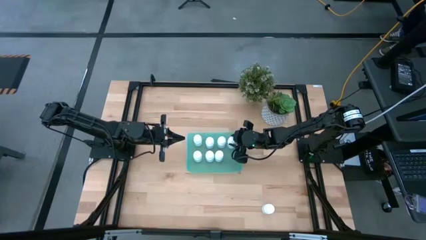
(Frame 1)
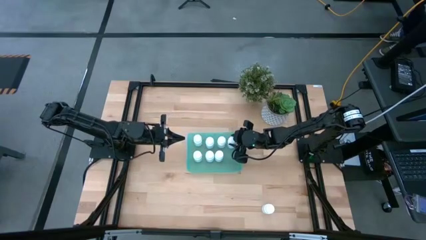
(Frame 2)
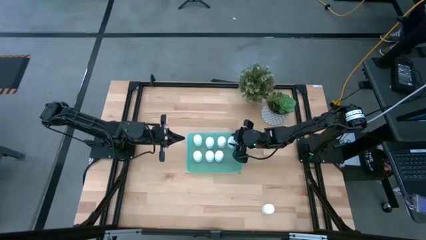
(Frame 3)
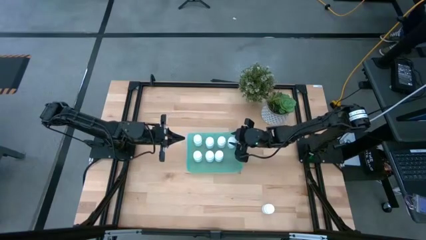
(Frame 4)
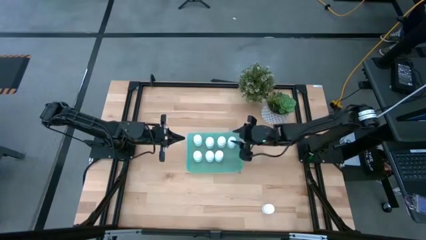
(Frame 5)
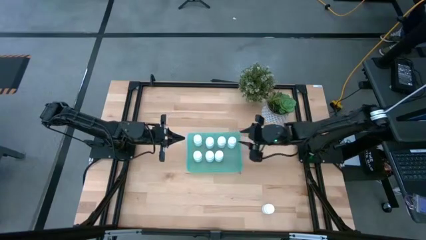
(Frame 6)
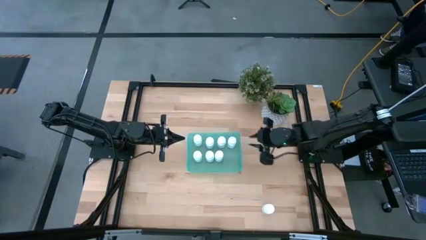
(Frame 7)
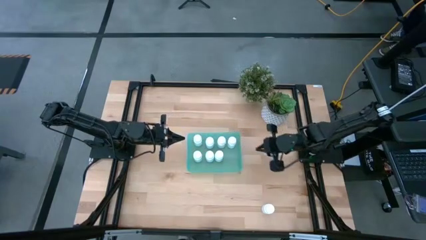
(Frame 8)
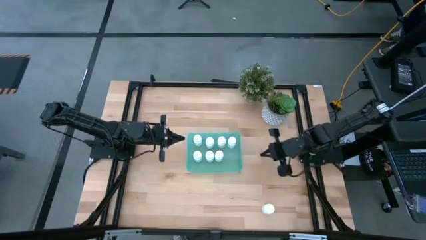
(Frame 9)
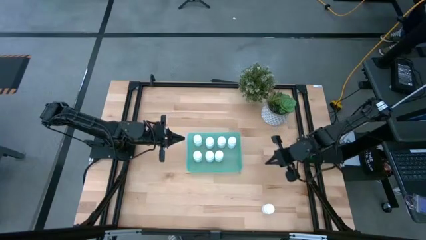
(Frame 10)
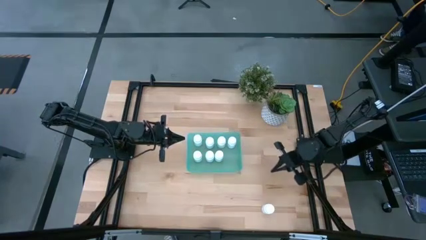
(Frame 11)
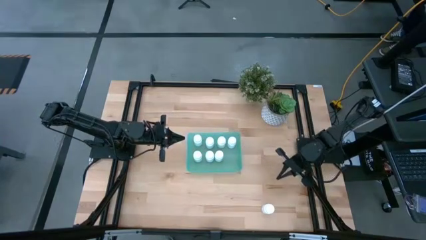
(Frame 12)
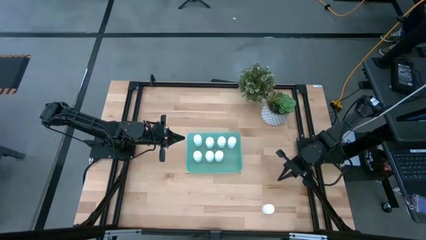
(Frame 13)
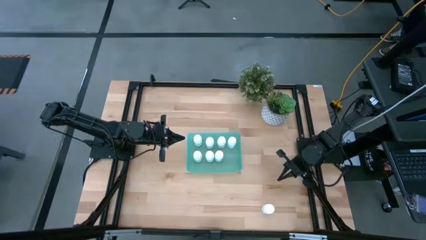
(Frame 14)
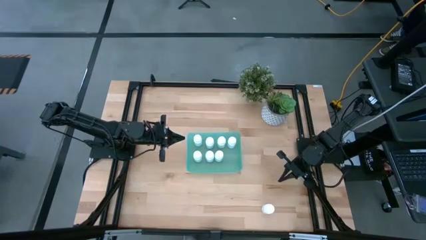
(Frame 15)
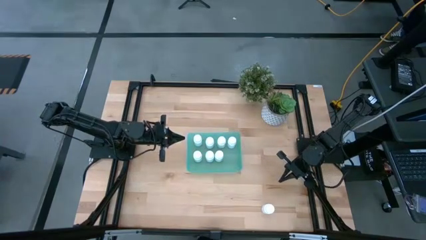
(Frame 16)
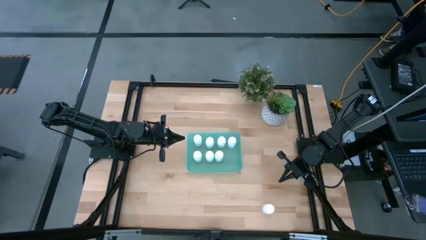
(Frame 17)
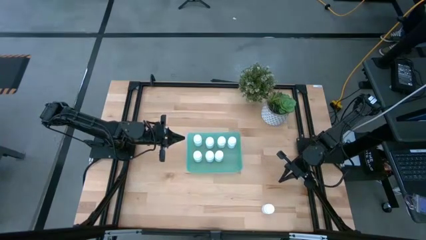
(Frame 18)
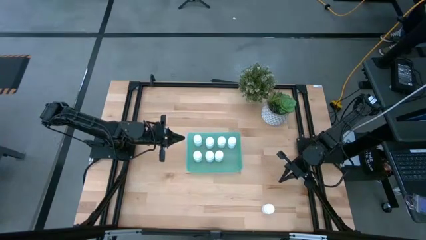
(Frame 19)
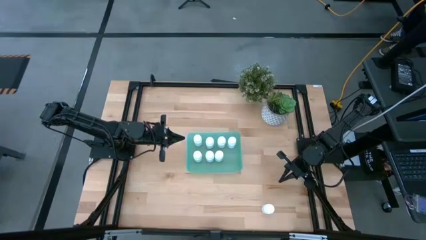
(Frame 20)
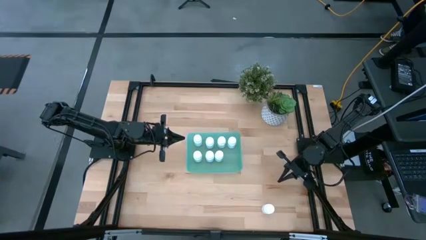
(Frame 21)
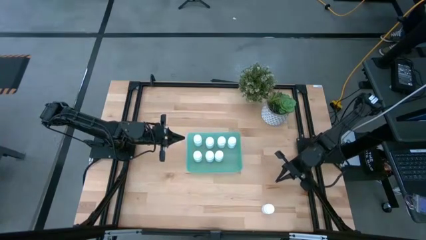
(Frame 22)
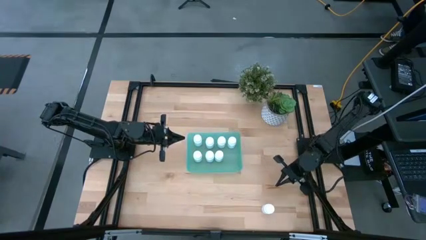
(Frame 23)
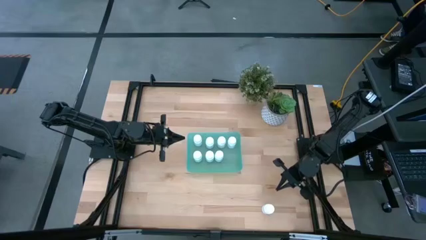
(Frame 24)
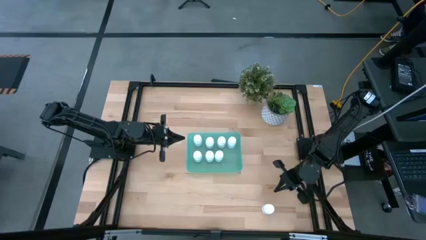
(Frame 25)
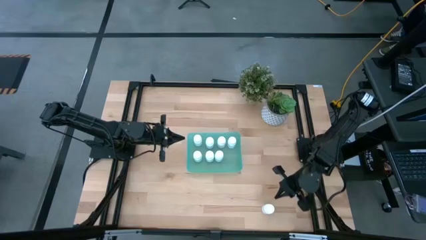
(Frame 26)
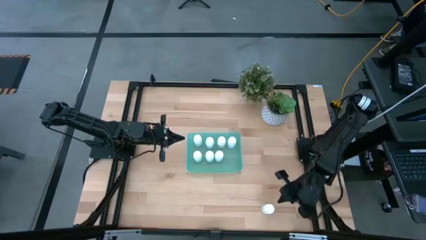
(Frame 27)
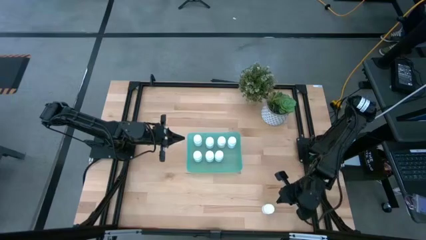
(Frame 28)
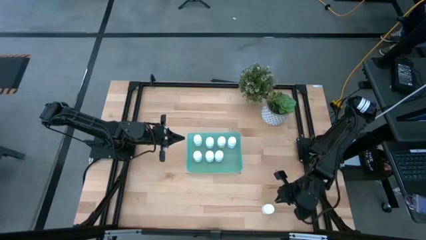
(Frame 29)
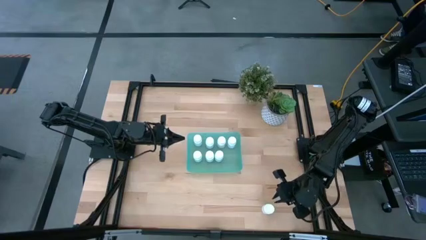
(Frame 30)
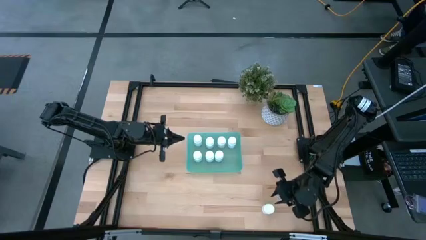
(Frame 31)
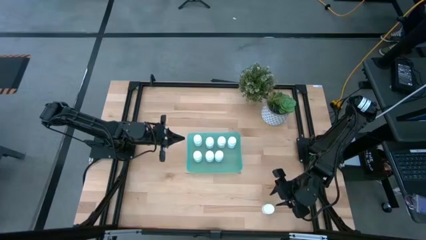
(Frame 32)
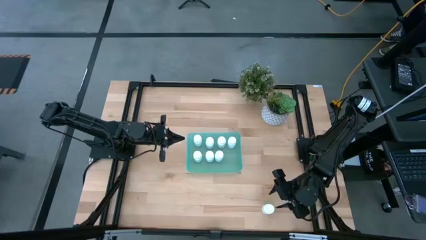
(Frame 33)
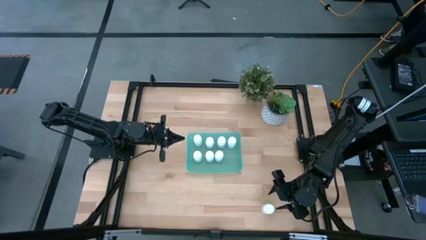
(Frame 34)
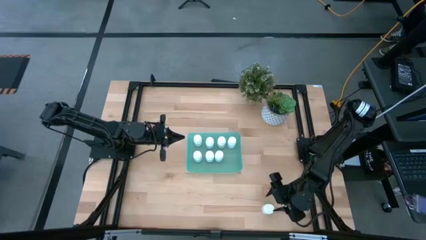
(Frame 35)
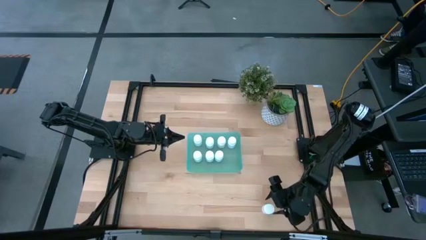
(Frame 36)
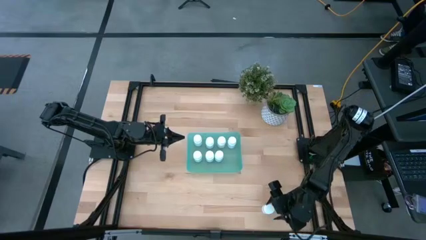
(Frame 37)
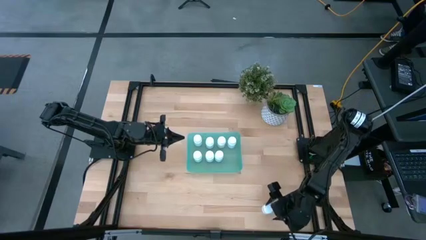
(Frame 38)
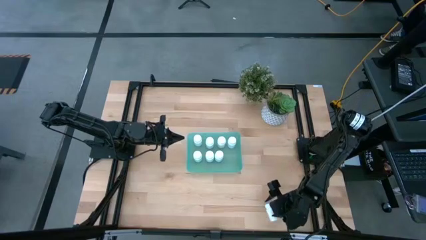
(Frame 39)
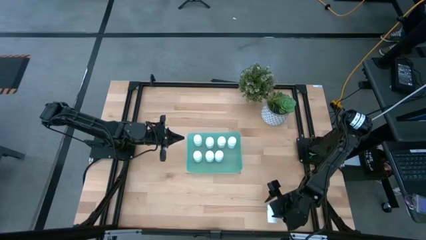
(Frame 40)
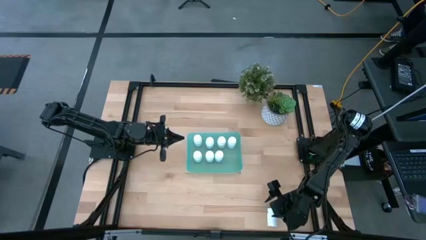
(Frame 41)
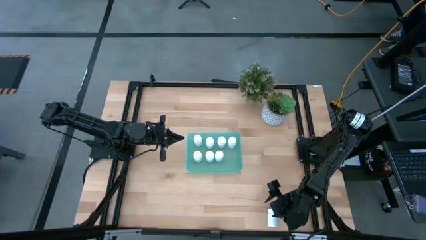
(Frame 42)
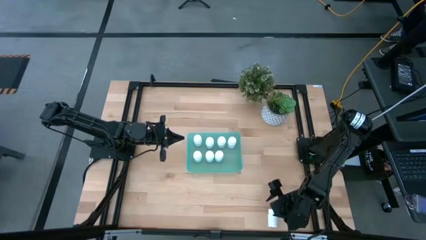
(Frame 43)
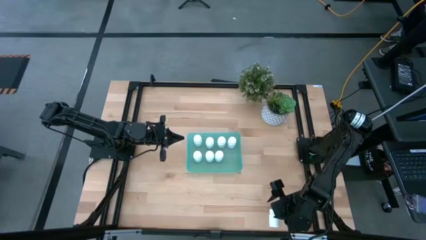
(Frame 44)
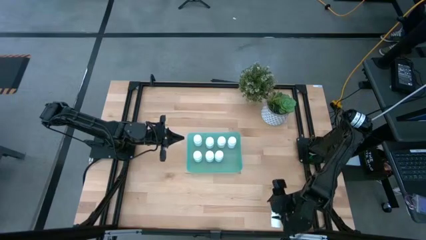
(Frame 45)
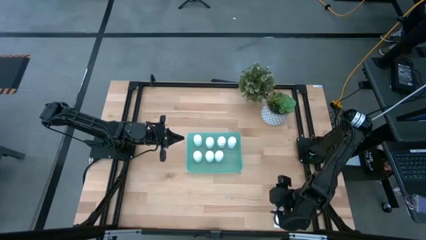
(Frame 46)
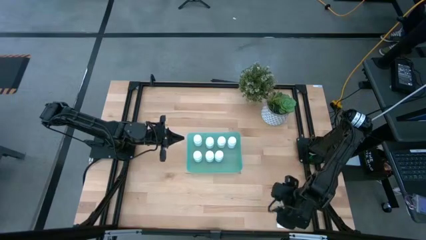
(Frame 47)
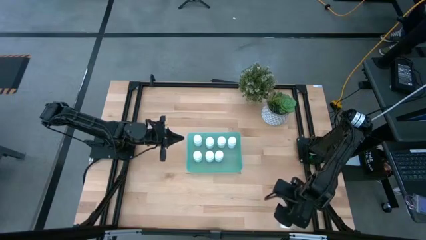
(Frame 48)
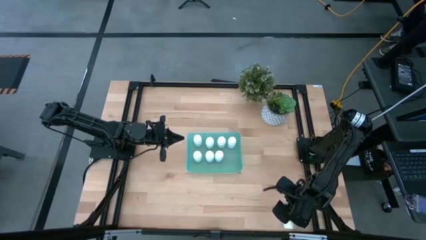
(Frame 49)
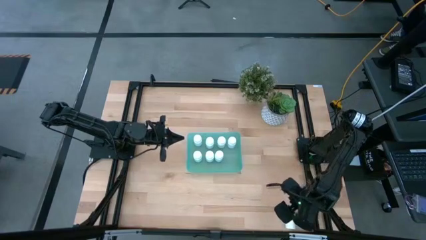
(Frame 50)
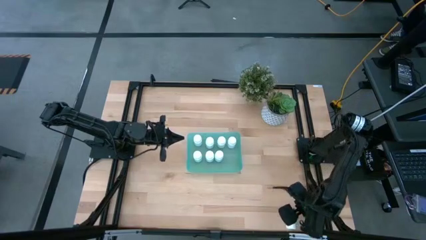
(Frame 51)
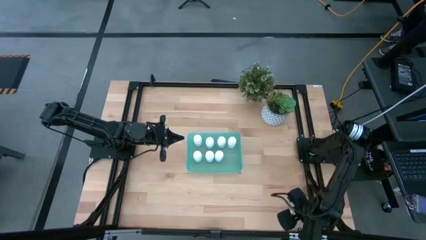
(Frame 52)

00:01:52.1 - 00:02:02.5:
Task: Pick and place pill bottles into a basket
Put the white pill bottle into the blue bin

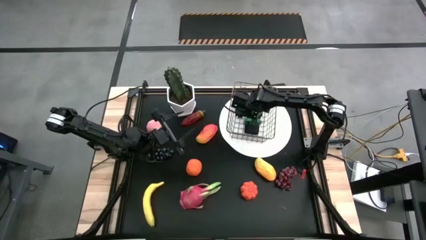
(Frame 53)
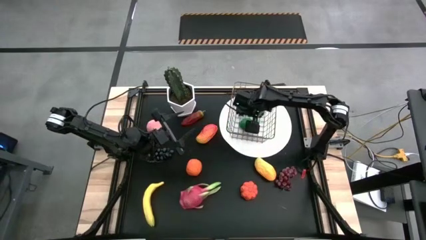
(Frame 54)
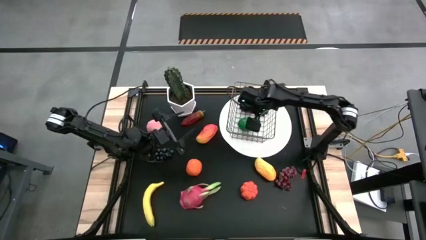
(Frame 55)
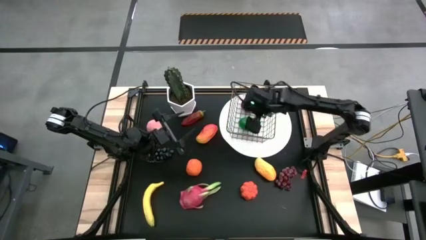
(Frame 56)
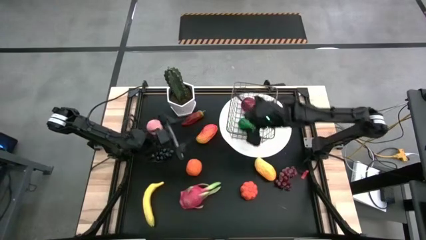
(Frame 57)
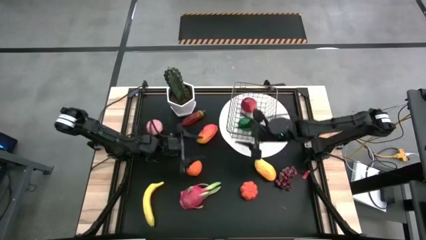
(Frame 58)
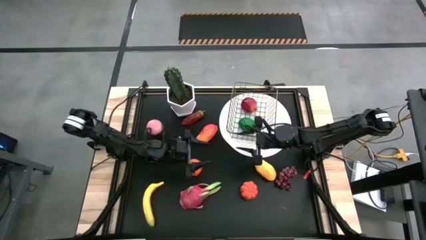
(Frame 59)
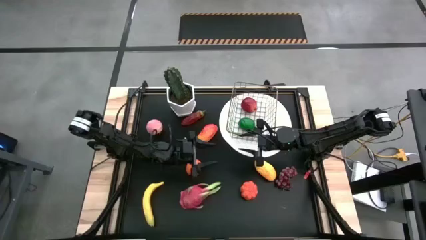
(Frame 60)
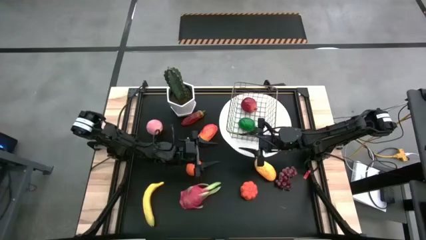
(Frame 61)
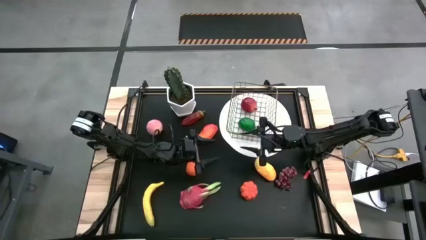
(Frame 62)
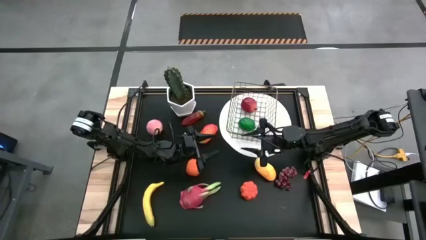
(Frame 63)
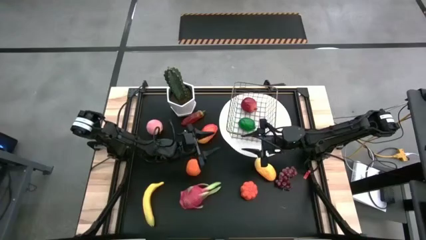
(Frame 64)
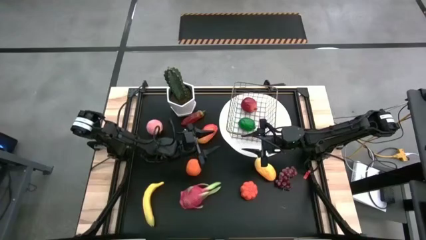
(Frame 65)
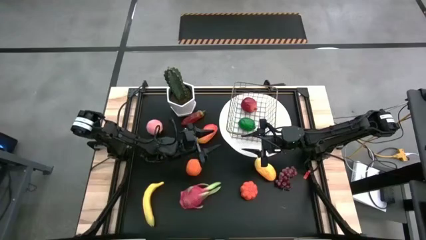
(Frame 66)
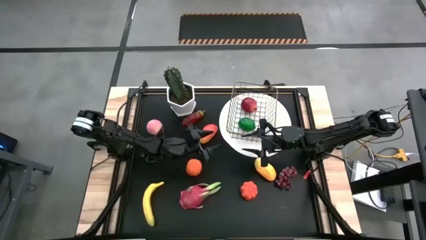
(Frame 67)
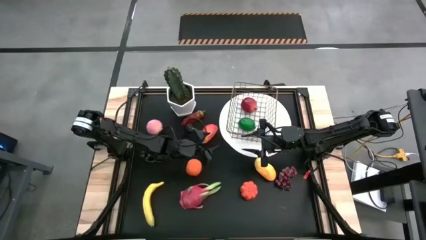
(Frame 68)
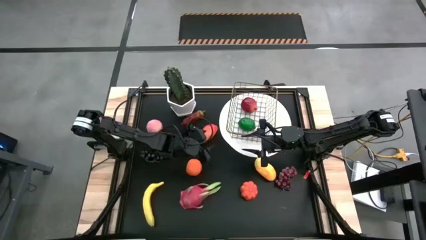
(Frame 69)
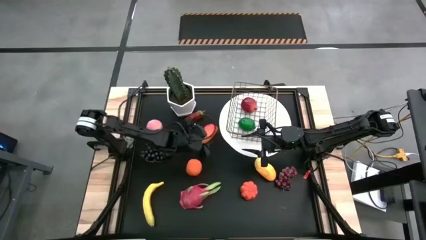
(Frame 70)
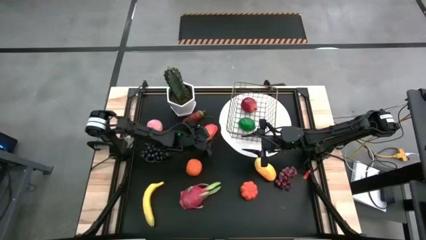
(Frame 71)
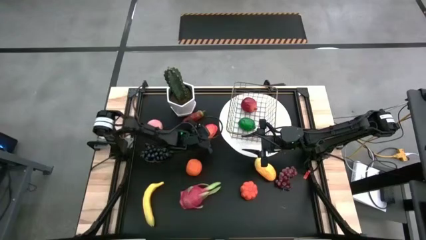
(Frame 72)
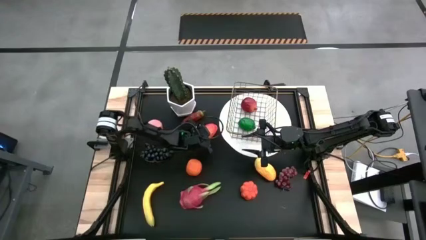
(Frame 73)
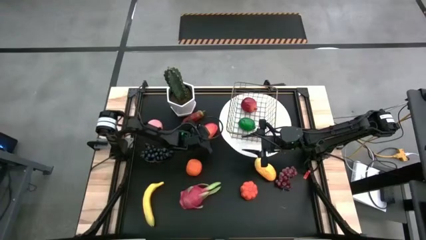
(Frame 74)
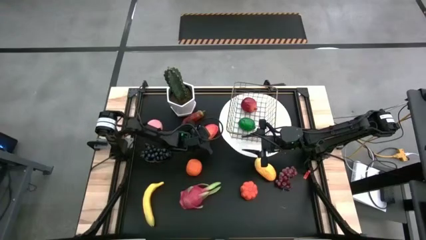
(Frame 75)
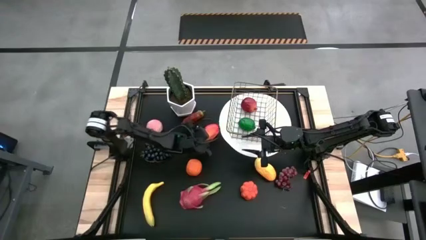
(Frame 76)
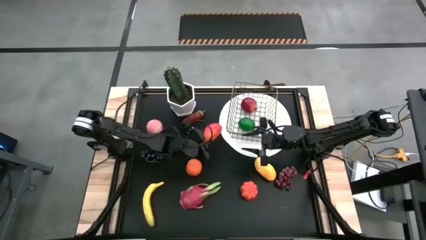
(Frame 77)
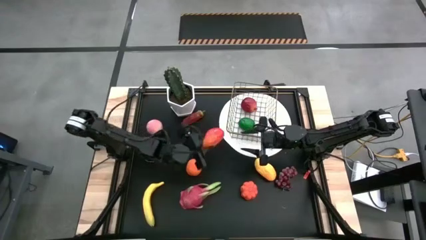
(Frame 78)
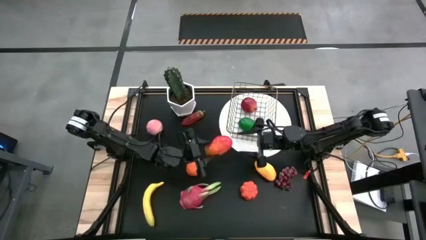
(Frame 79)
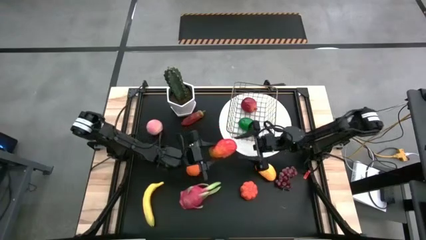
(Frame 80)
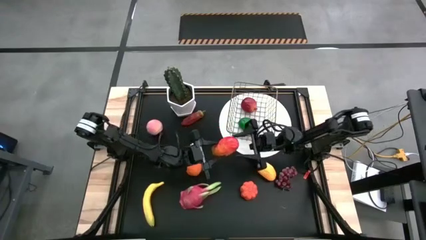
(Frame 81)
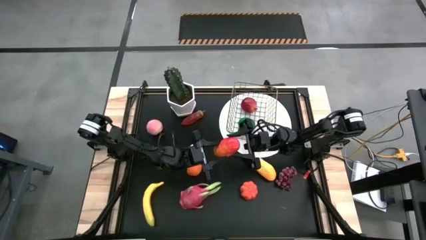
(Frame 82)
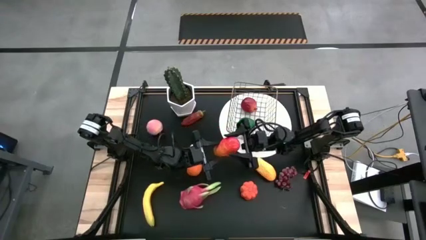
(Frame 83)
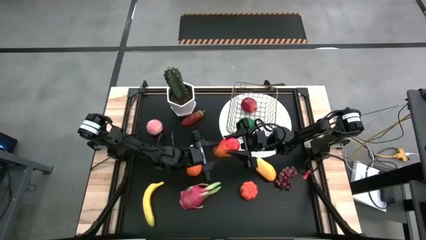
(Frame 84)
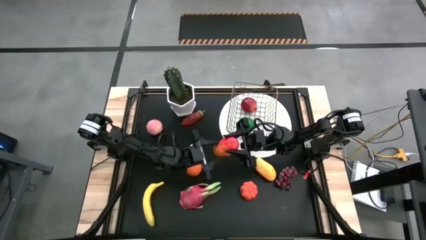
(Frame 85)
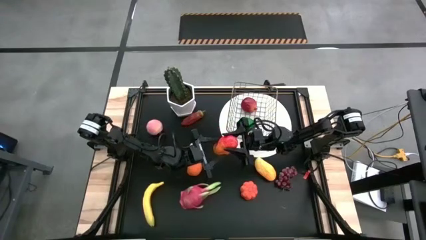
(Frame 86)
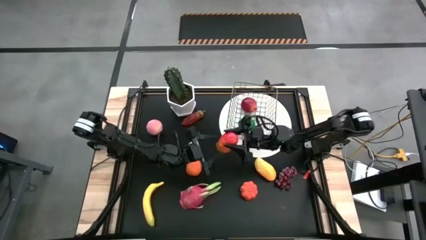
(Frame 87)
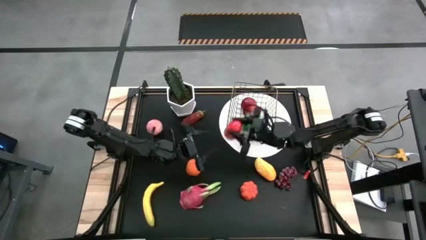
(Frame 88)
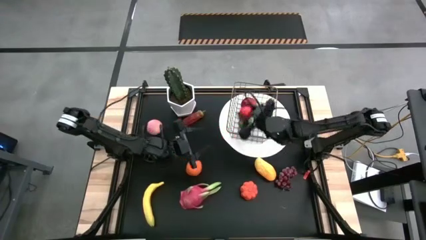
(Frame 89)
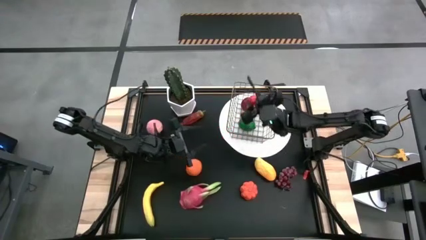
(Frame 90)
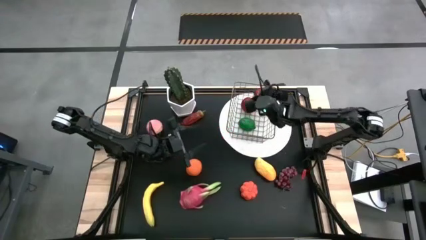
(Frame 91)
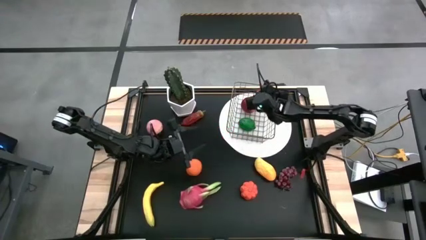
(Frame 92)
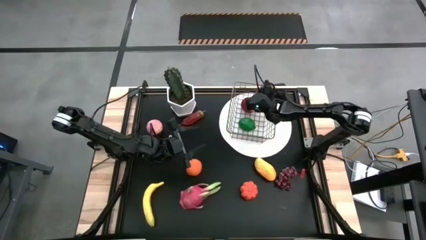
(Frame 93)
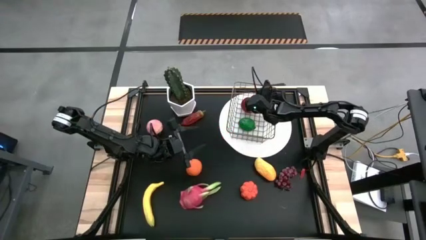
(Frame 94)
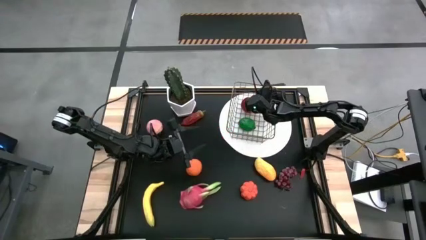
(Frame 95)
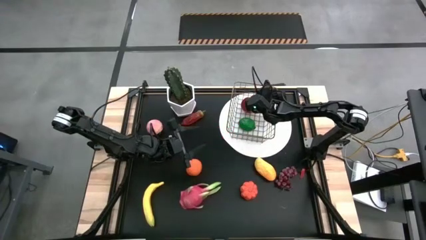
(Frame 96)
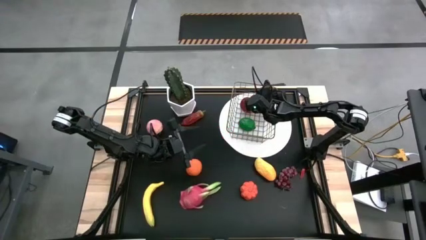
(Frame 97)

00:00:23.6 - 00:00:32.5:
Task: Build produce basket
Put the red mango into the wire basket
